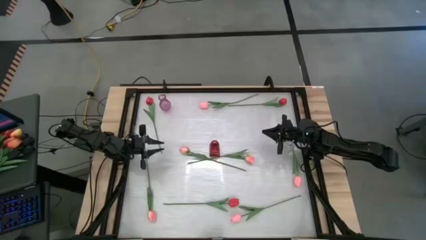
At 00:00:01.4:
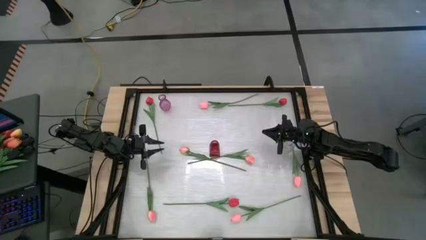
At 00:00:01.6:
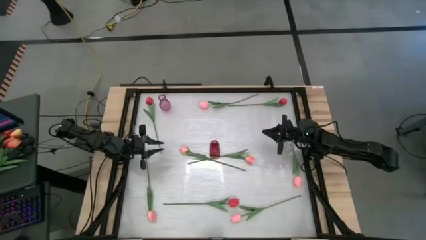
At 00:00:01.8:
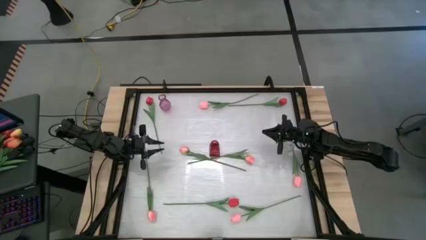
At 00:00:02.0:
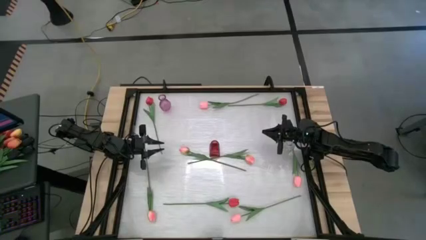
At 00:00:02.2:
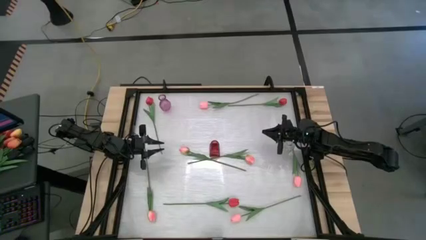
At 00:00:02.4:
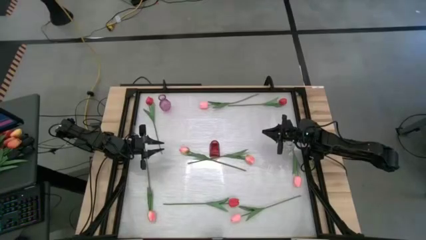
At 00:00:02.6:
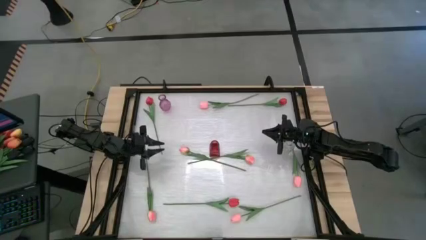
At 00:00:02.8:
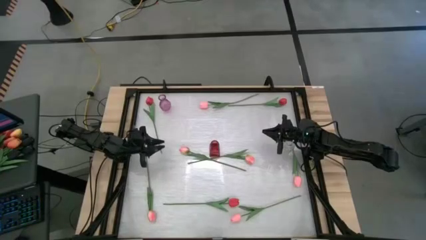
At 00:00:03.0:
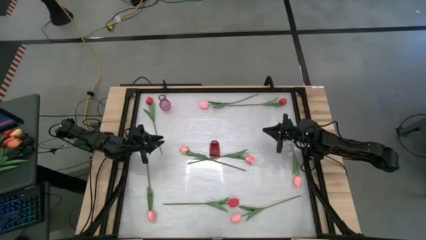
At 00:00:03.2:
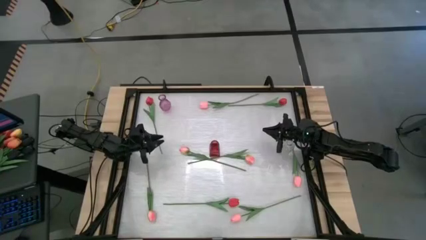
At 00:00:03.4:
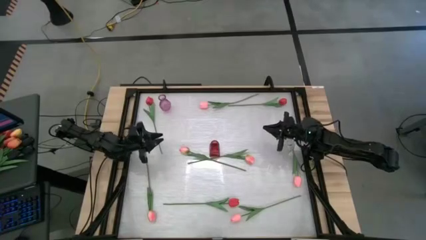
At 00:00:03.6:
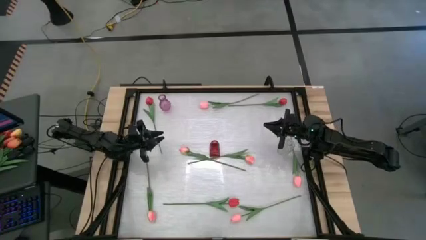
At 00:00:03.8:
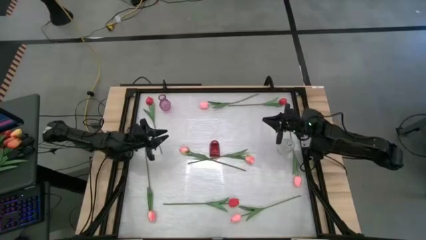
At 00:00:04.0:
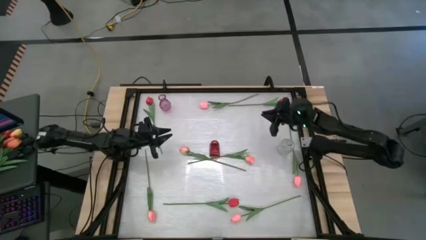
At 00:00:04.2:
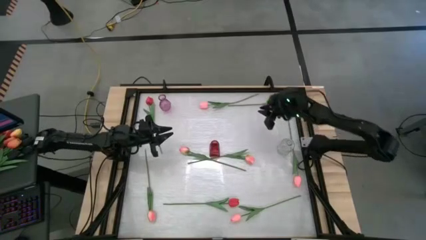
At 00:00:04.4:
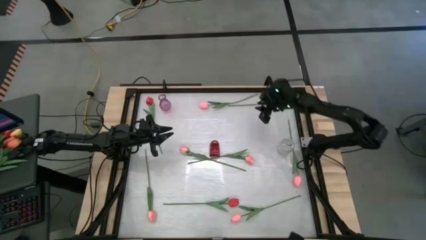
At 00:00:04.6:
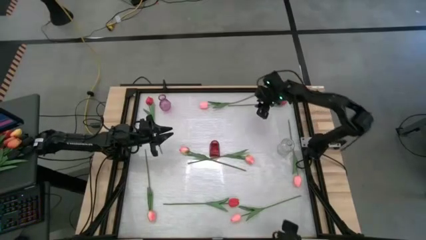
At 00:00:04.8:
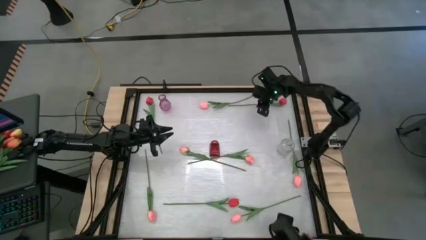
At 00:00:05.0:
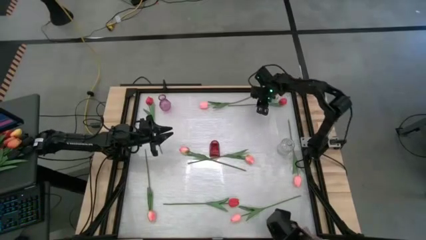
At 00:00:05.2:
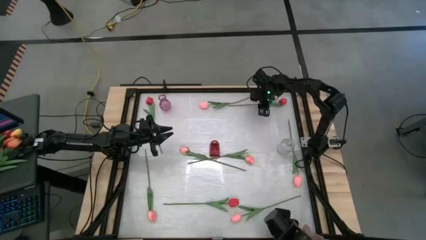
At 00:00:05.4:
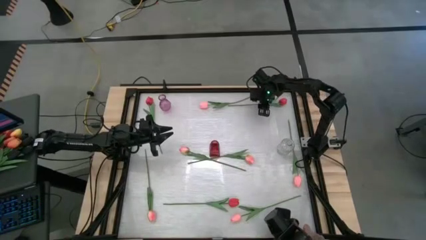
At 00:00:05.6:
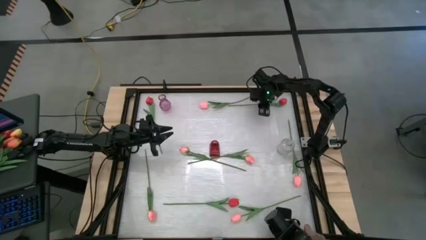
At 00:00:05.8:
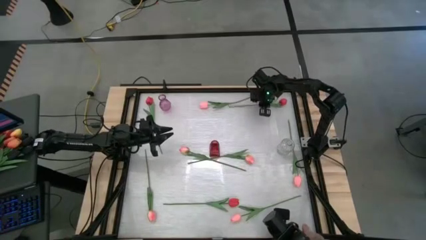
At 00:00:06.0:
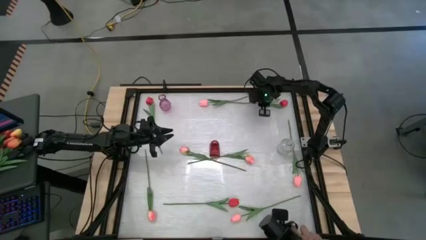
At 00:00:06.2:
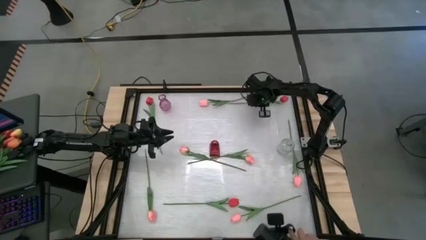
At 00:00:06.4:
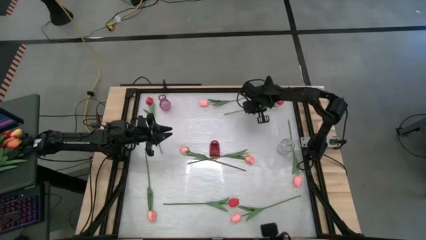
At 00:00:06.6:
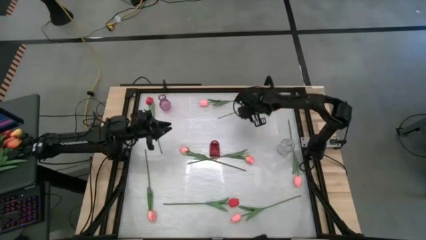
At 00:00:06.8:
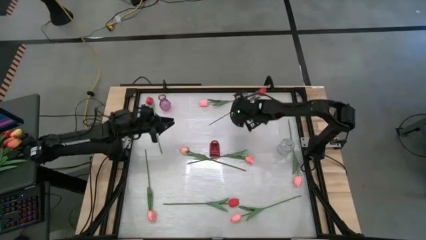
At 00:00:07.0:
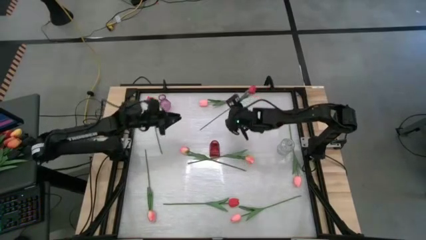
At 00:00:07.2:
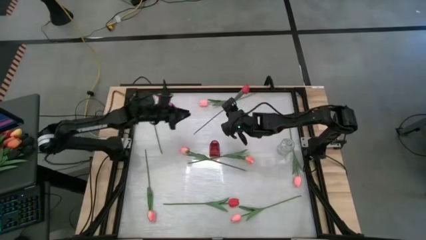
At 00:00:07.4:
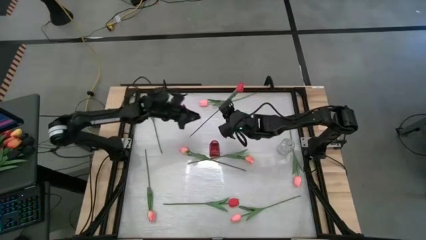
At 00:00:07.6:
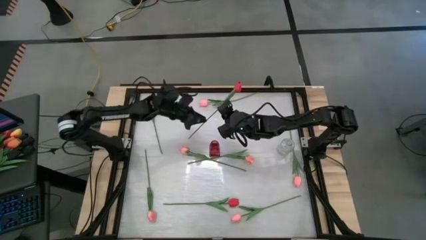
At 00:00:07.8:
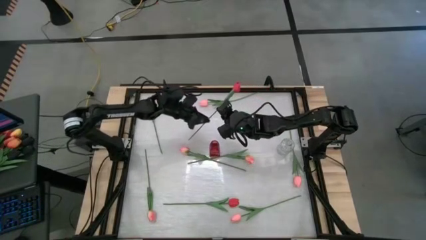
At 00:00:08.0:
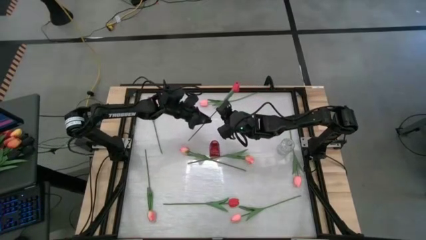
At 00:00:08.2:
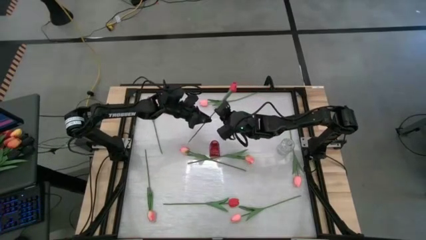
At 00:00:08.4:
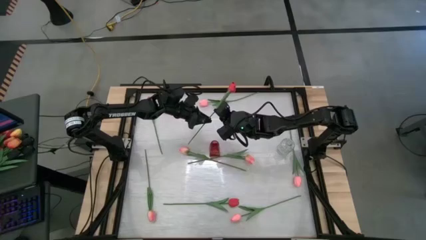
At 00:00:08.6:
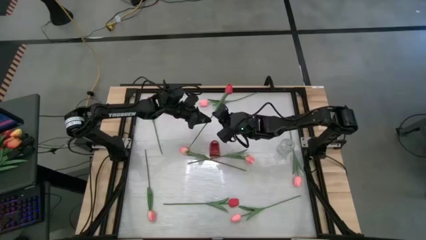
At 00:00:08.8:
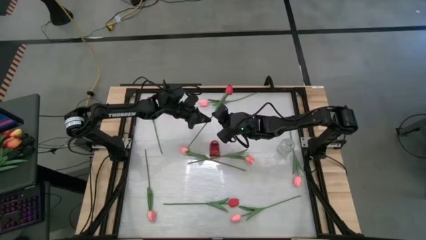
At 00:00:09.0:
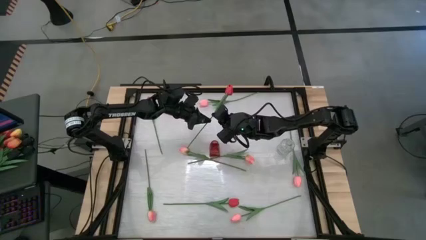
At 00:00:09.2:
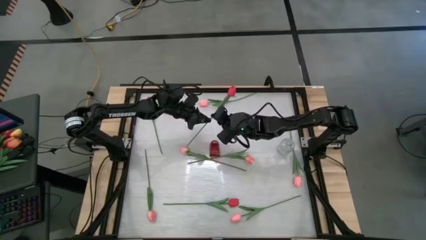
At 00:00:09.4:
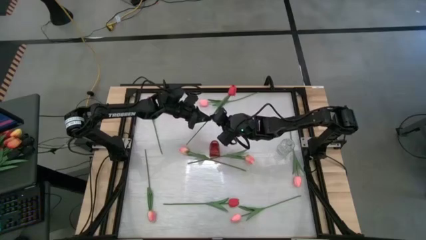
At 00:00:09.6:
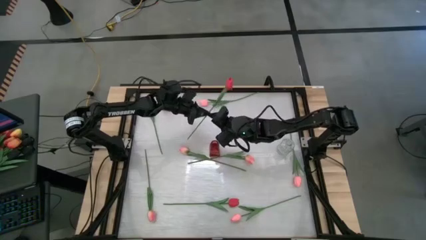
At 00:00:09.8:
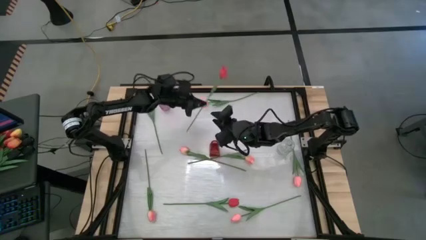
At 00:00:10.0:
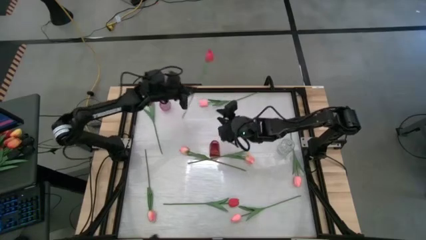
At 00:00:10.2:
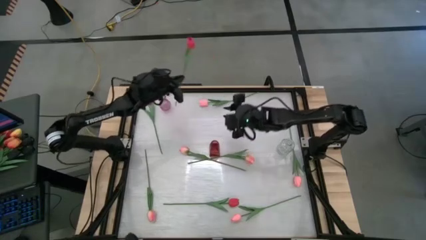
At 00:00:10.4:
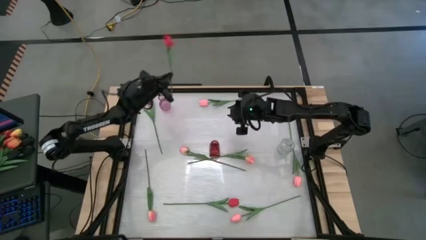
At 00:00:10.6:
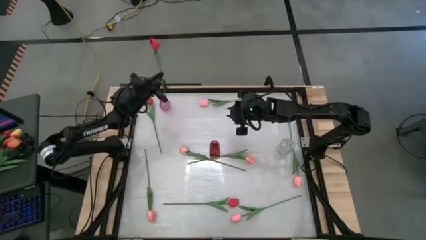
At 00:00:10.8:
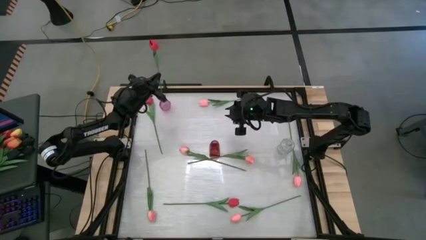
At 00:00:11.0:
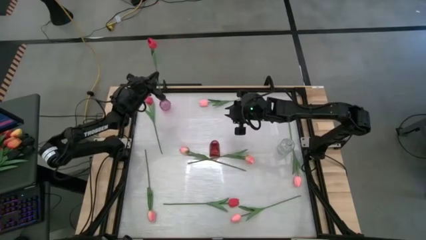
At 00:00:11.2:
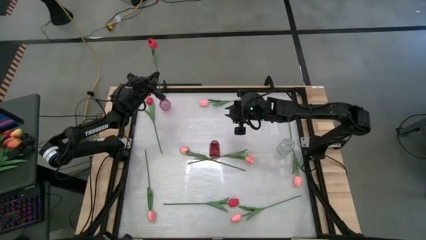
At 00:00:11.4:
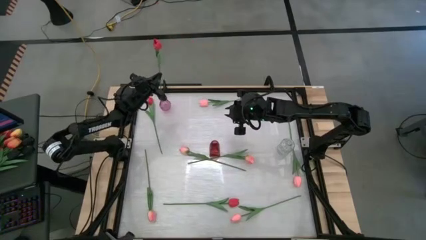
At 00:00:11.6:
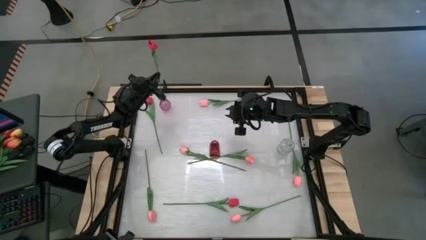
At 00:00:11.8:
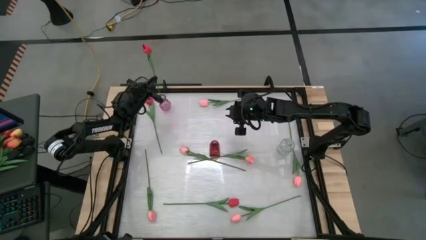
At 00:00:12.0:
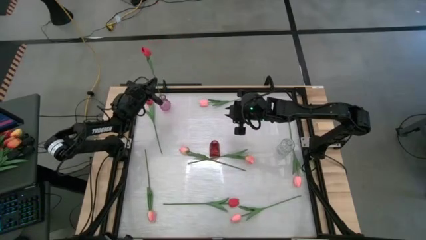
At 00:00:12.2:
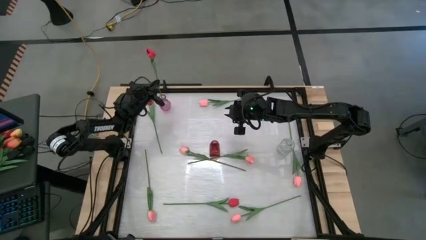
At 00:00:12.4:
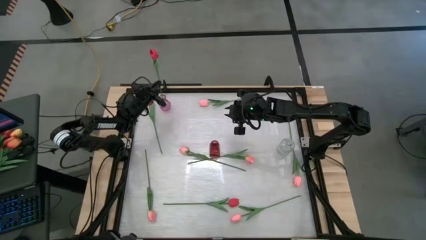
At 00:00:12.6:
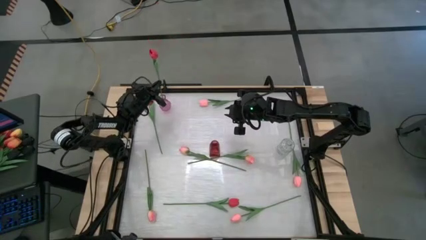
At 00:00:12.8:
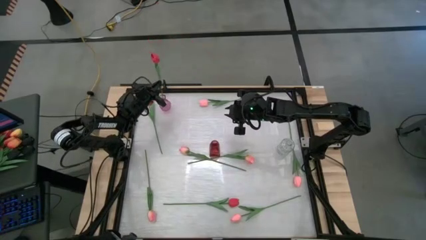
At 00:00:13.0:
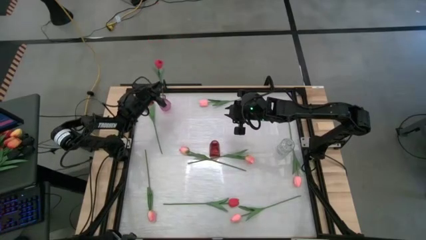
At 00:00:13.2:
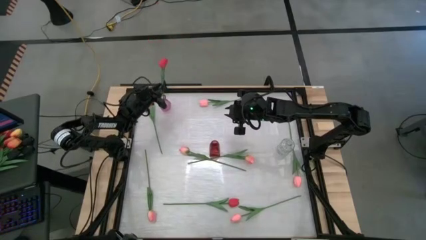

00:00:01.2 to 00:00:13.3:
Task: Sort flowers into vase by color
Put the top right red tulip into the violet vase
